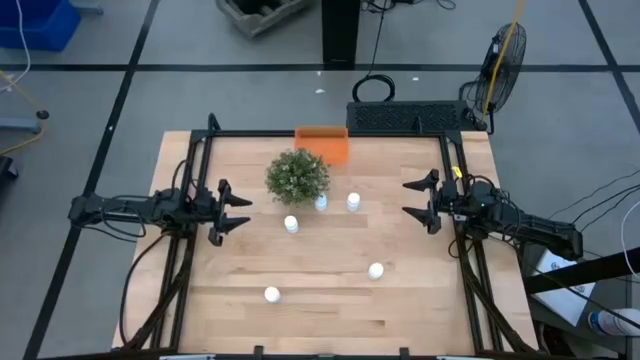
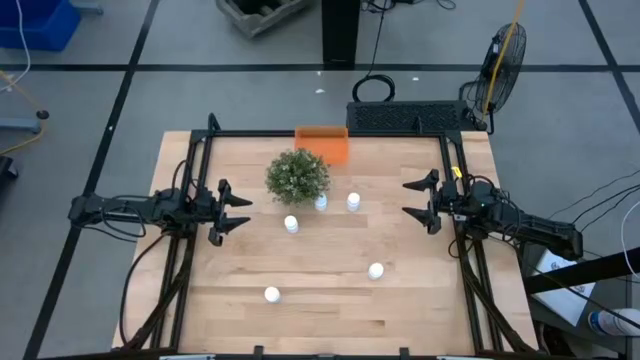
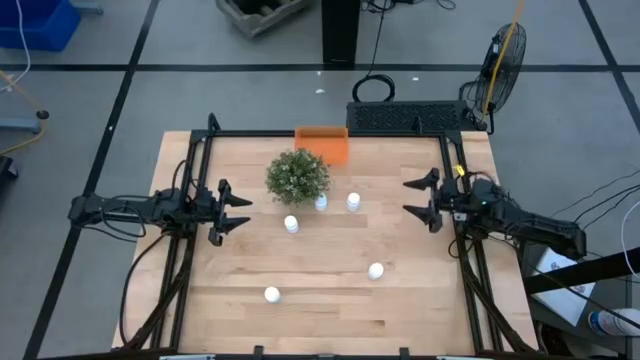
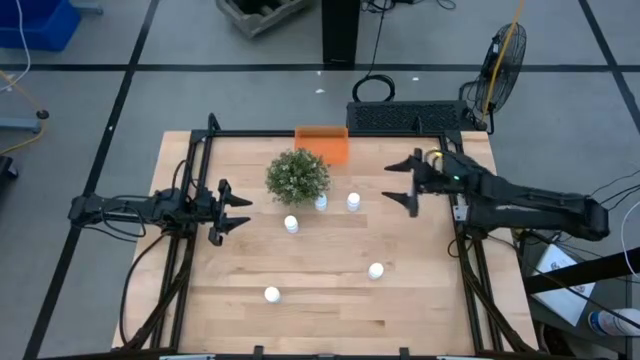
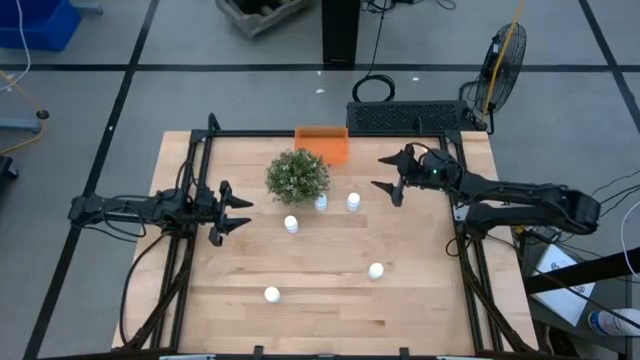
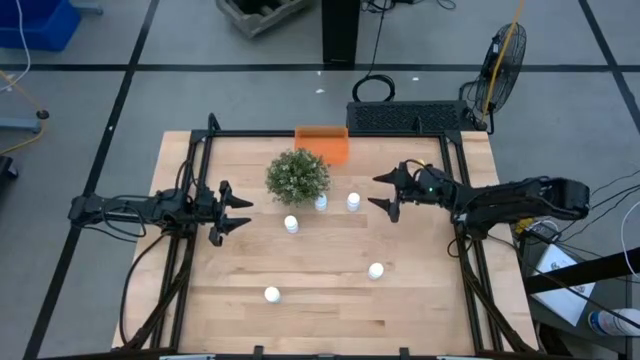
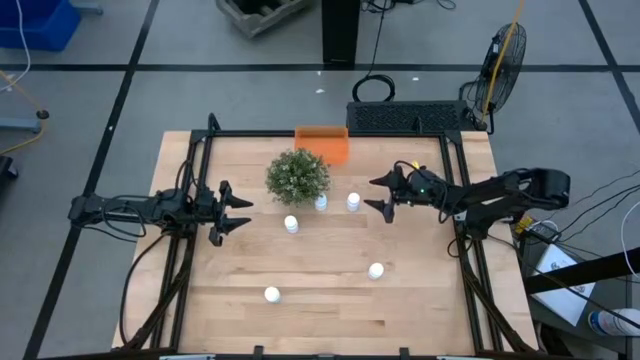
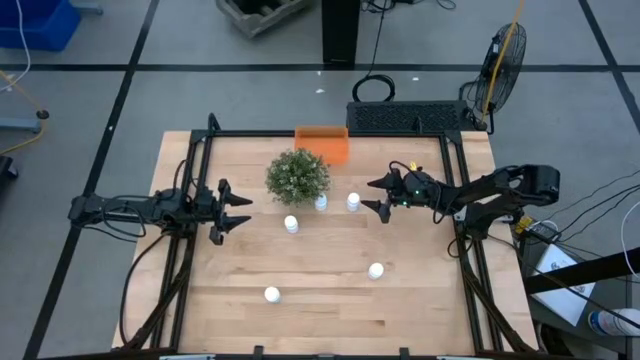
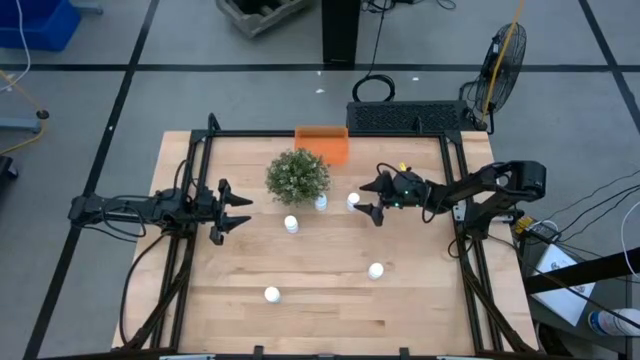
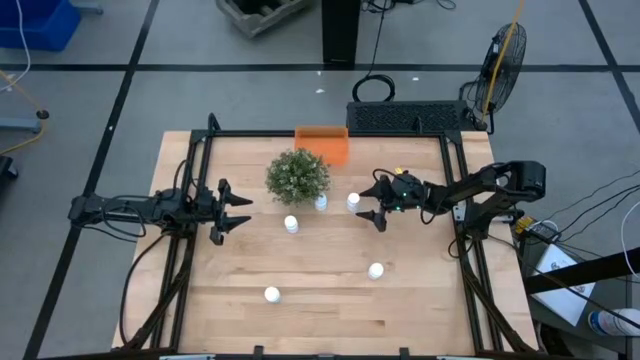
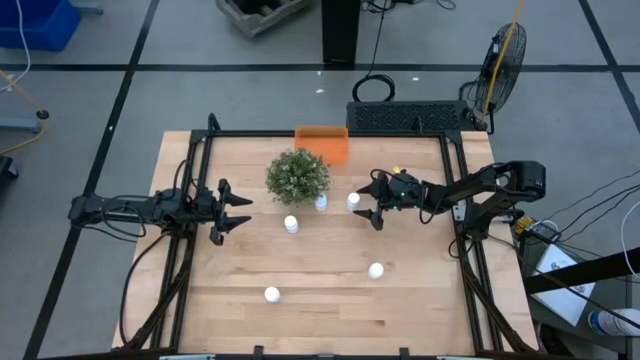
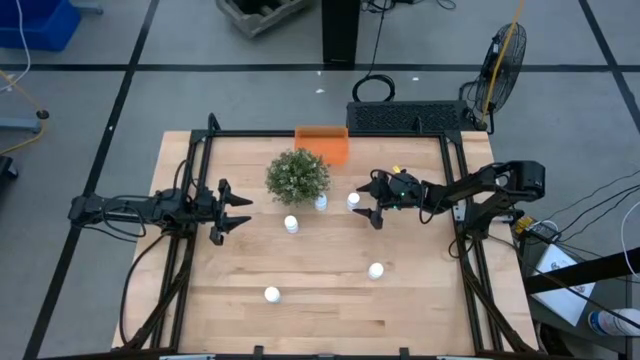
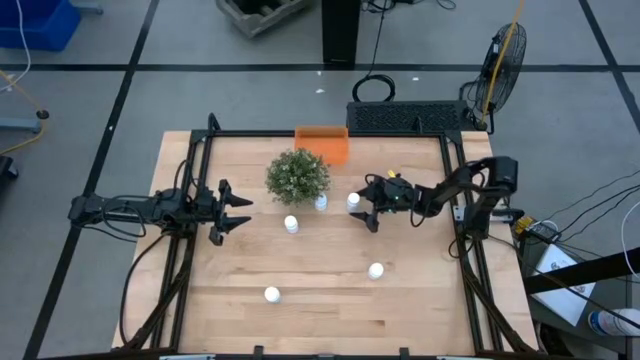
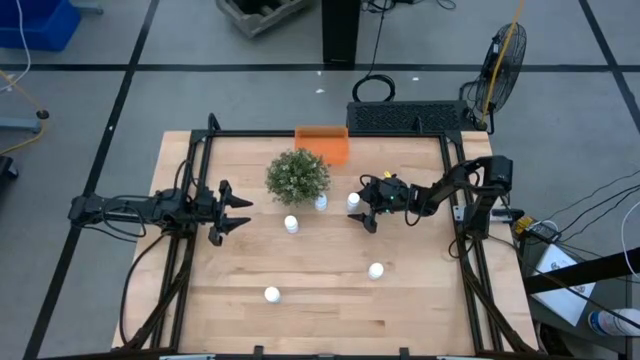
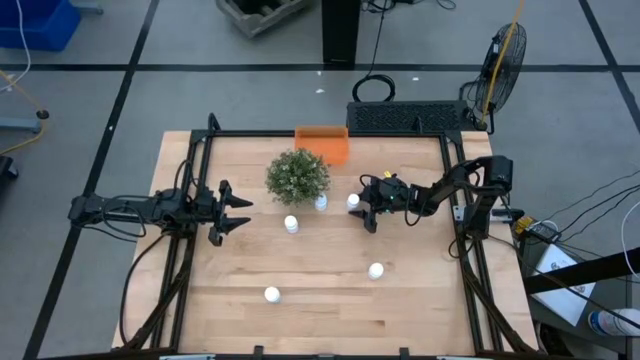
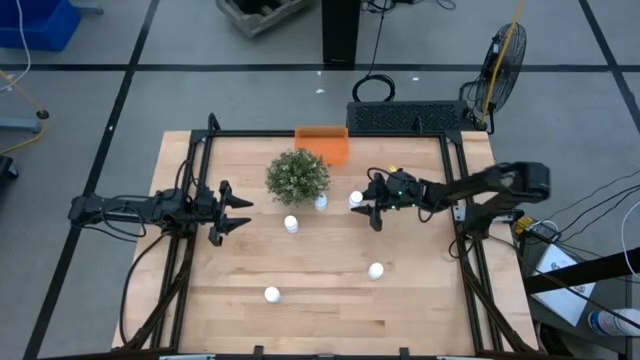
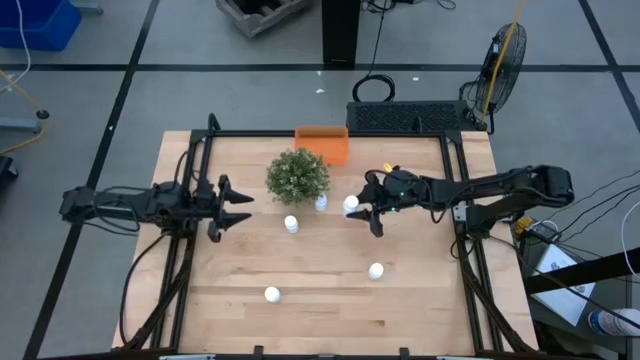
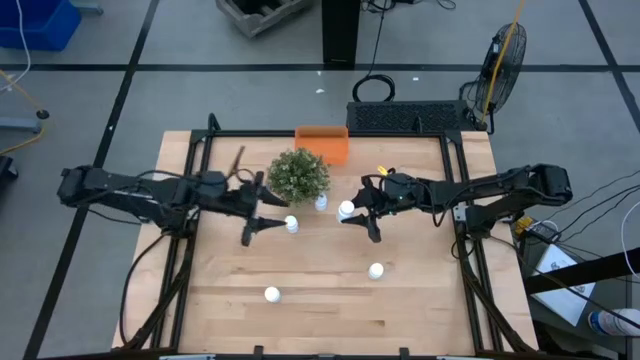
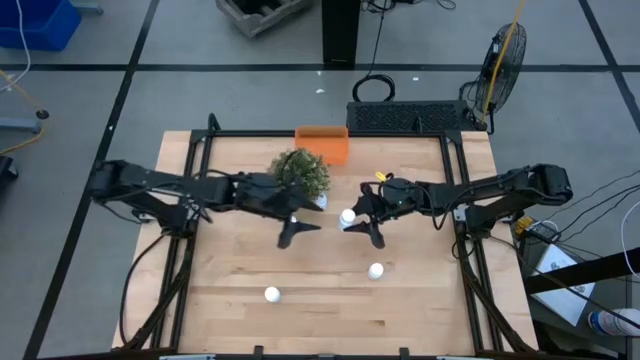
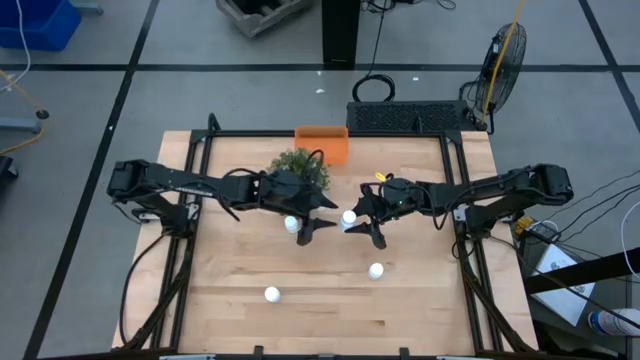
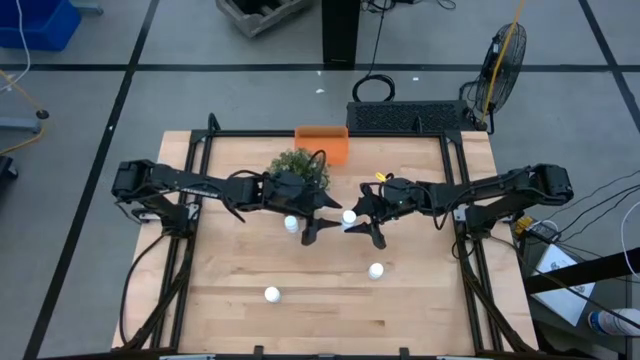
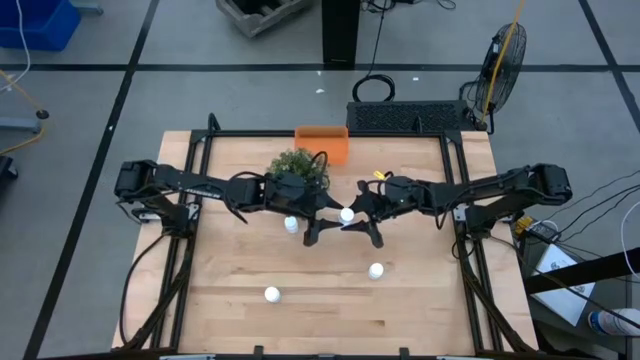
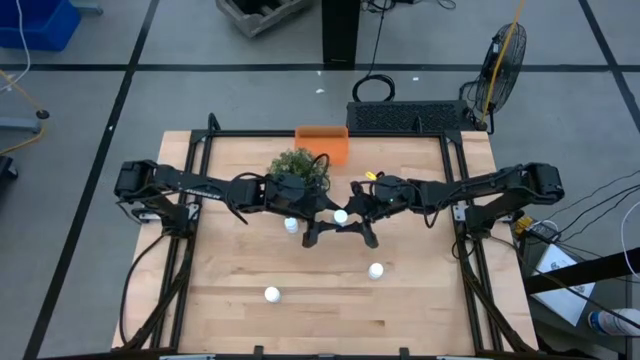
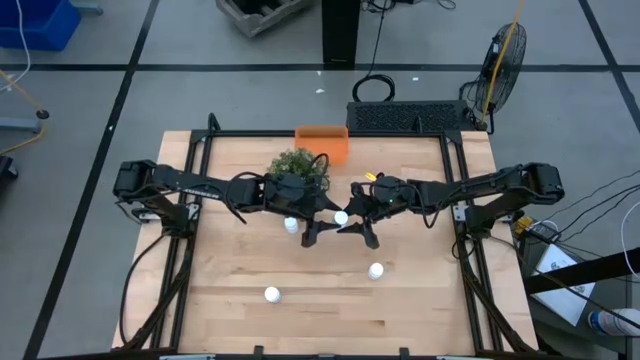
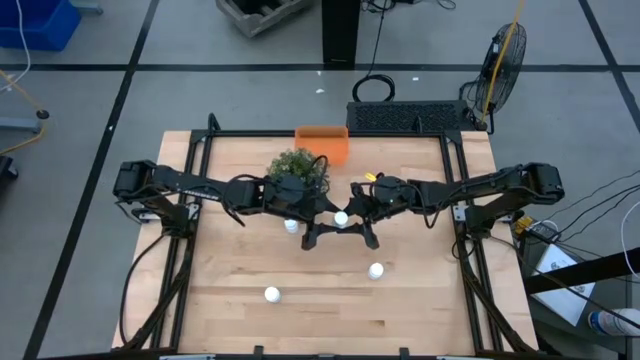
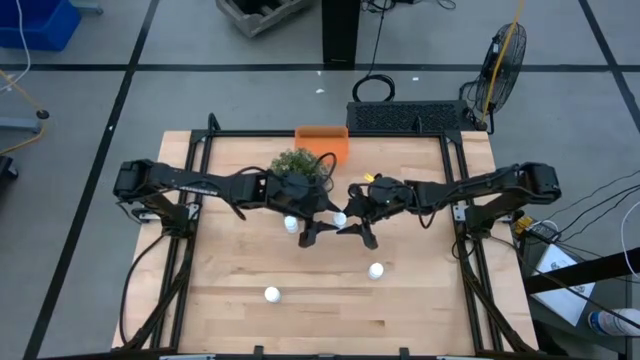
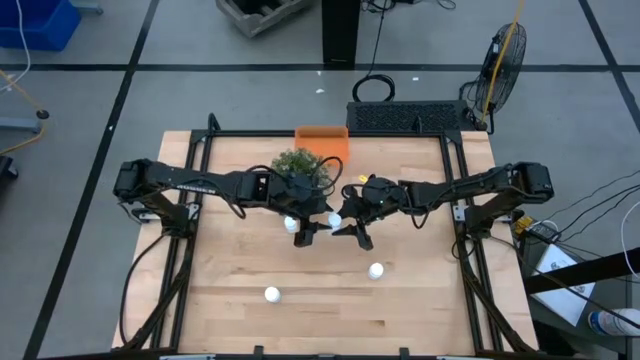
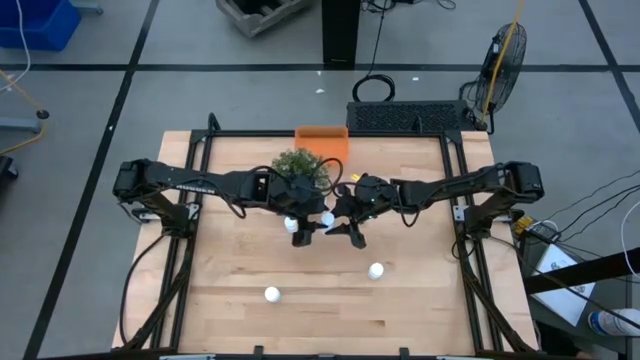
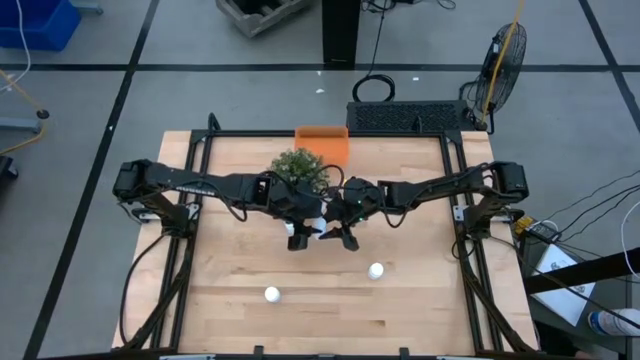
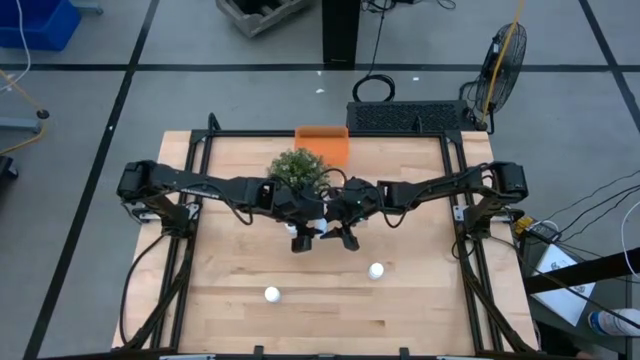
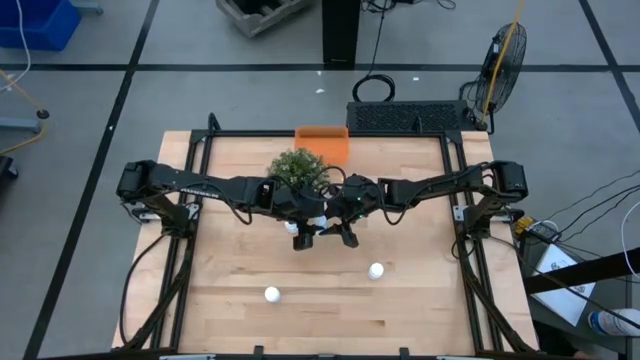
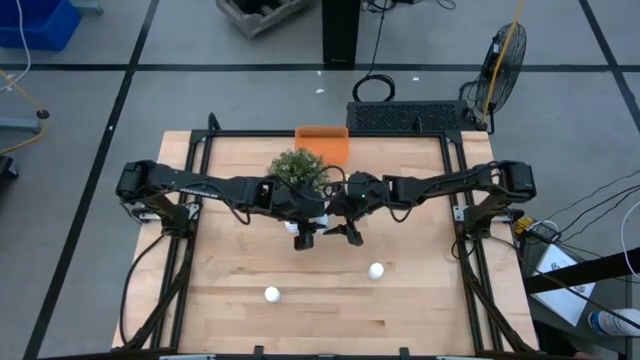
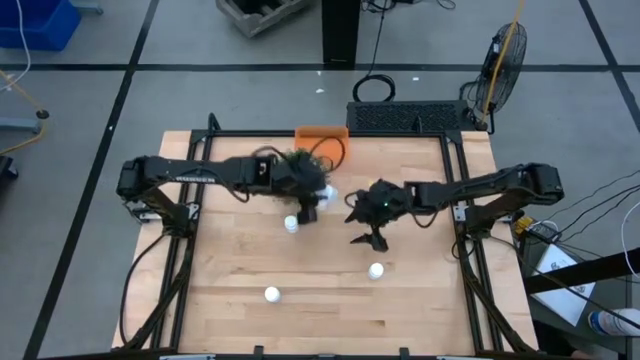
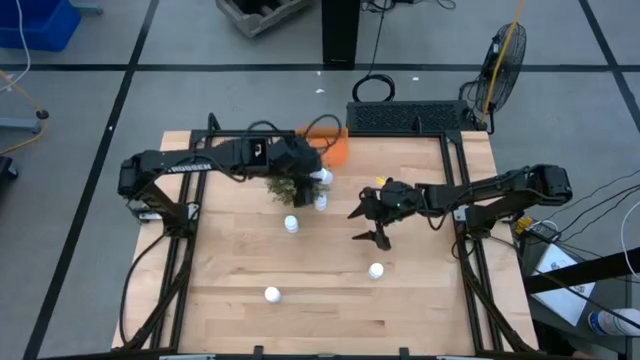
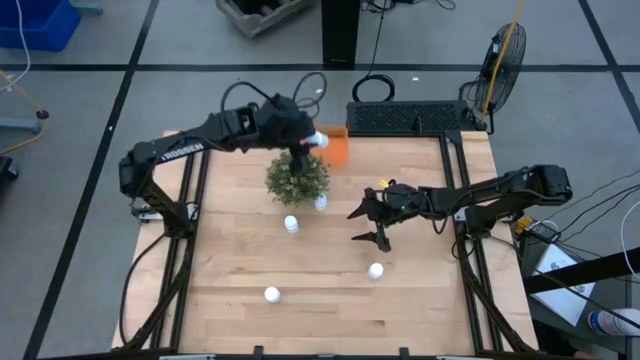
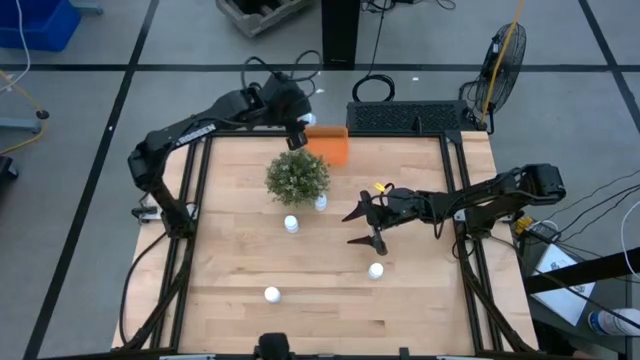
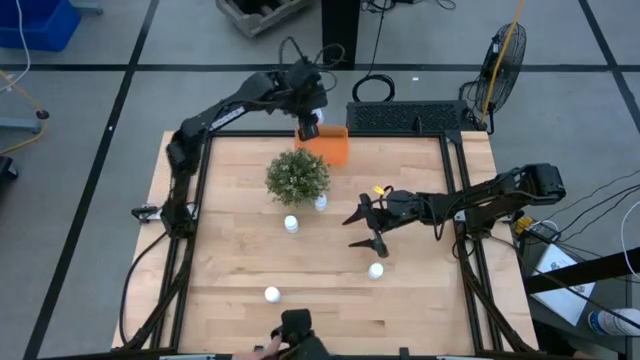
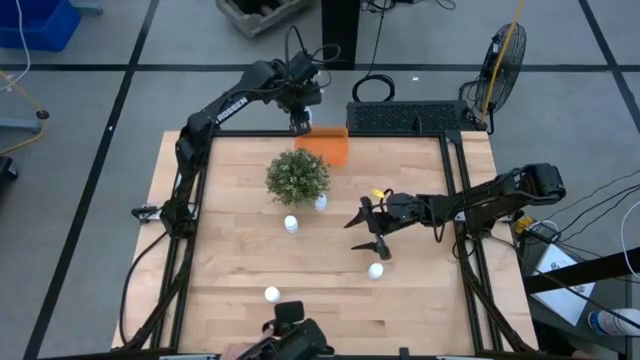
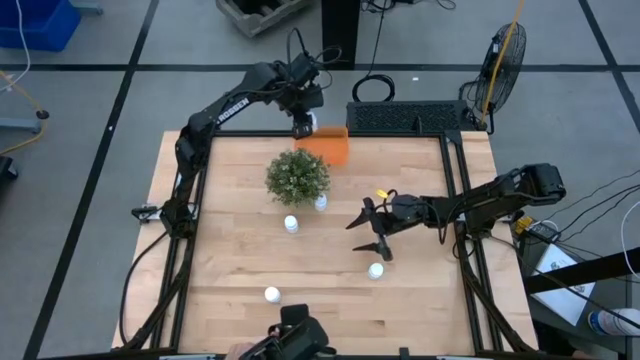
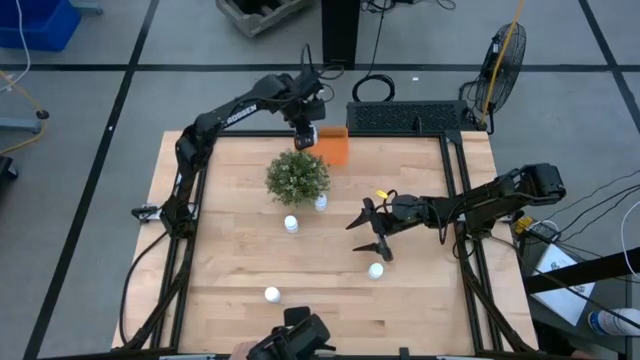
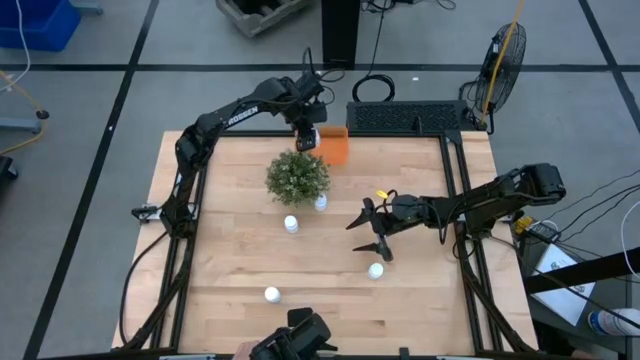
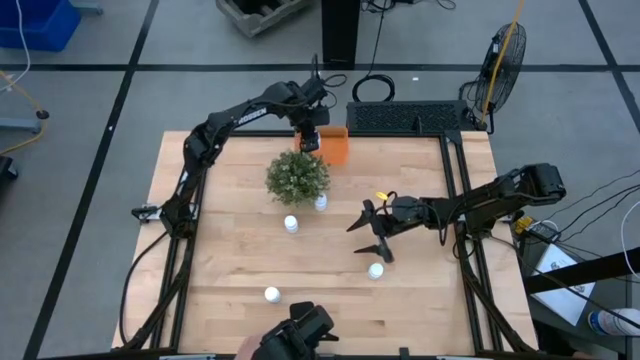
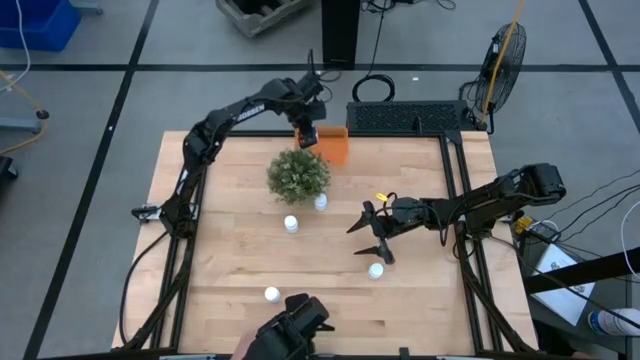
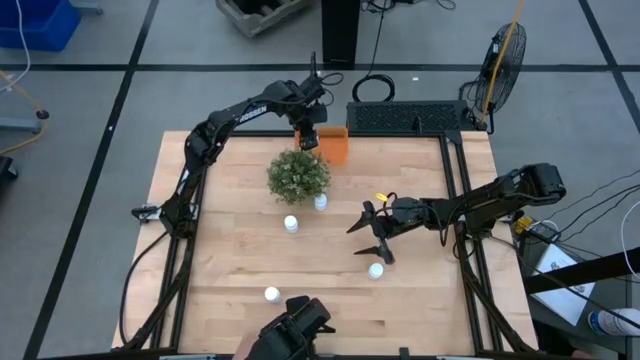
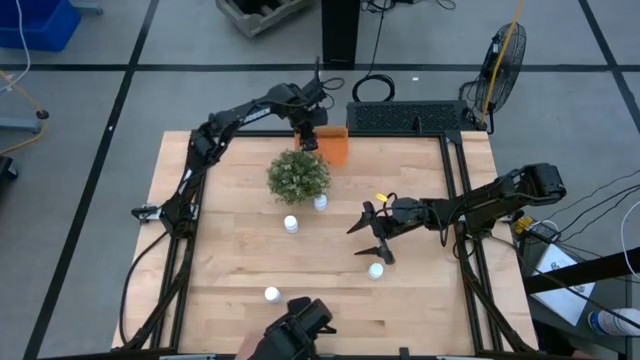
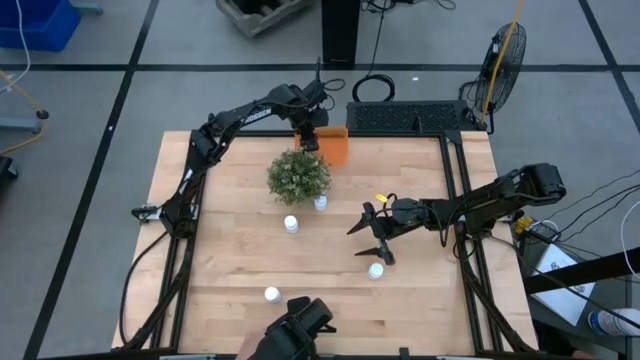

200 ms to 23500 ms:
Task: Pick and place pill bottles into a basket
Put the white pill bottle into the orange bin
